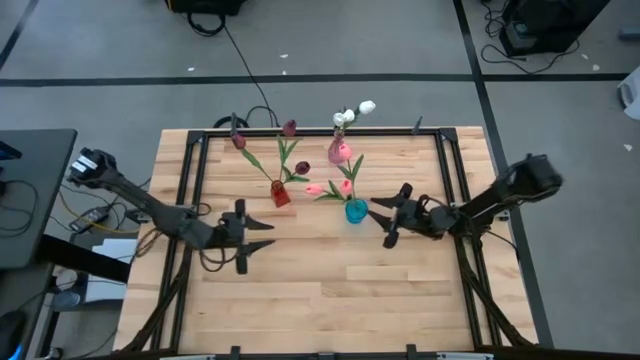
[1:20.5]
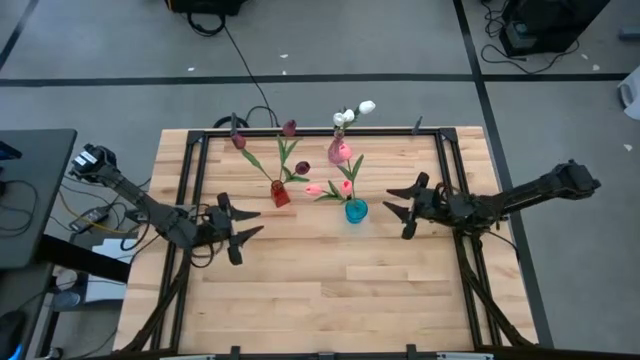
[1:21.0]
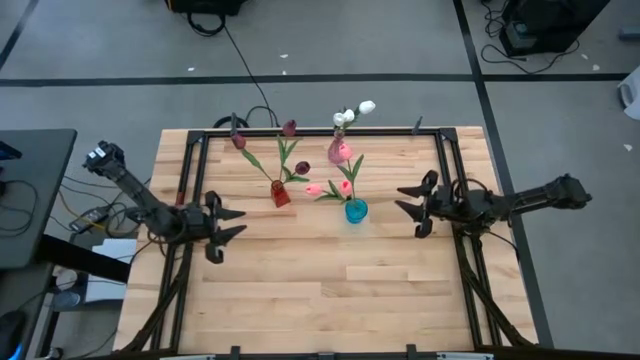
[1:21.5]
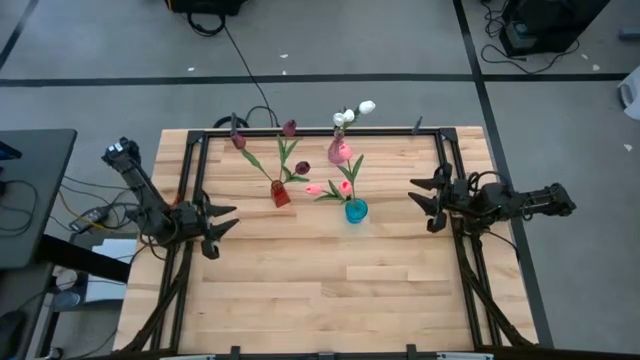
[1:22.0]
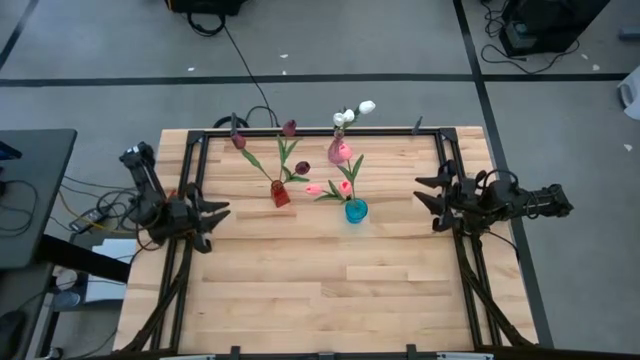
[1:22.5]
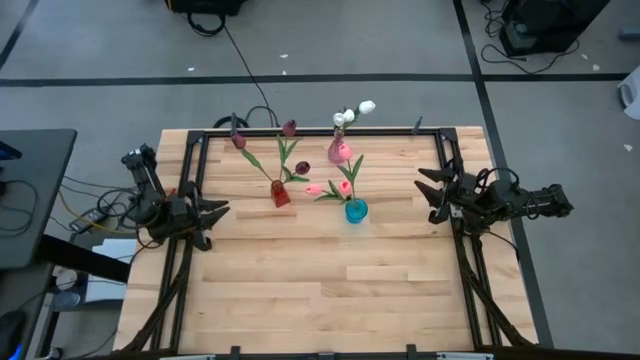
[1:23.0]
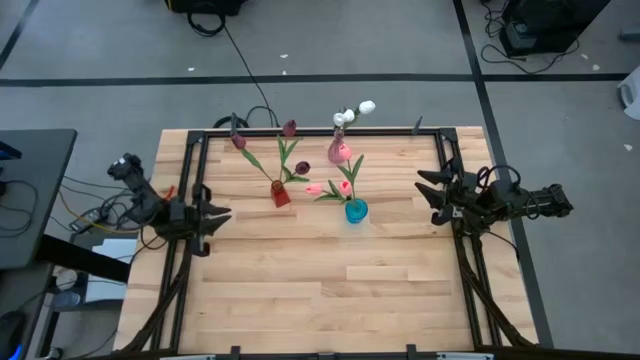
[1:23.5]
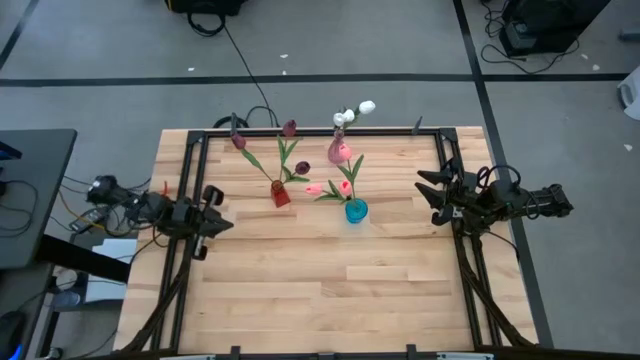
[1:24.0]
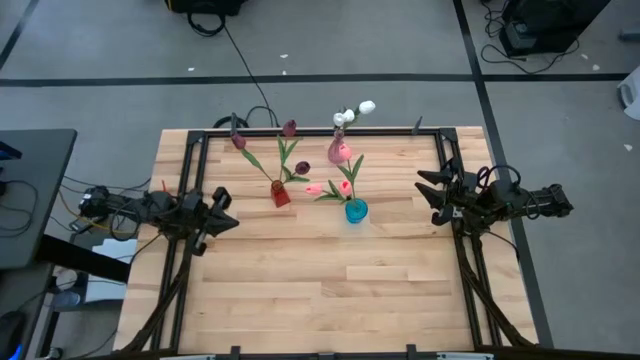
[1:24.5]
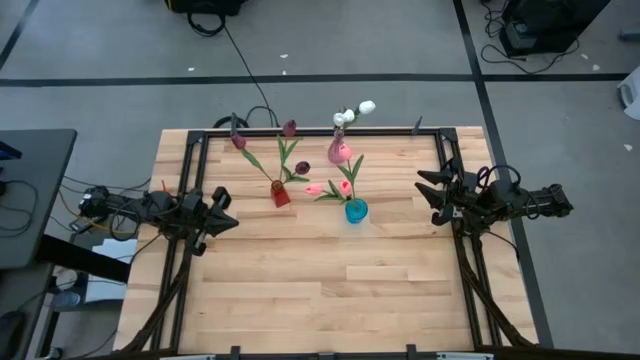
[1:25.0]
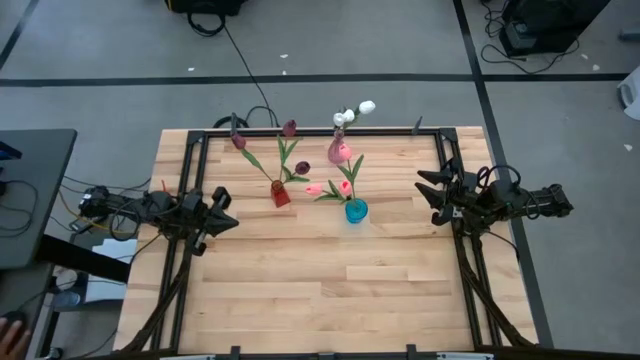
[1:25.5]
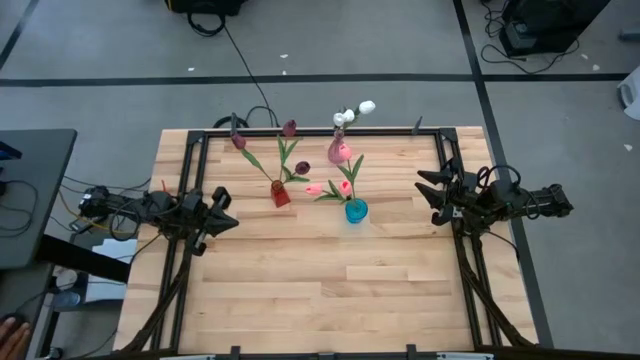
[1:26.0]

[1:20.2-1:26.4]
Task: Sort flowers into vase by color
Return to Home Position

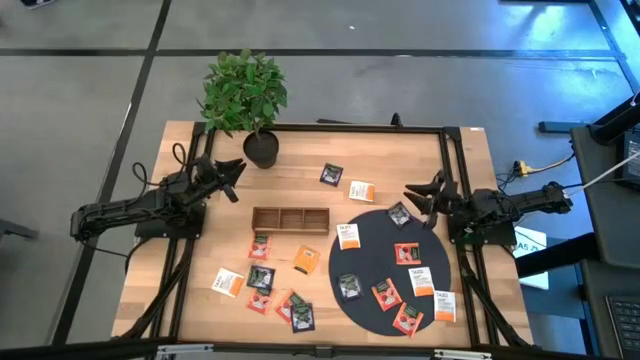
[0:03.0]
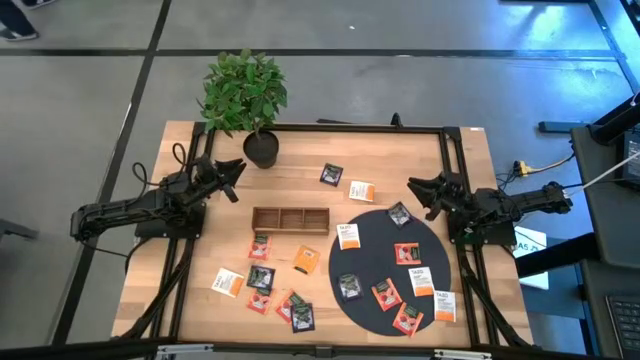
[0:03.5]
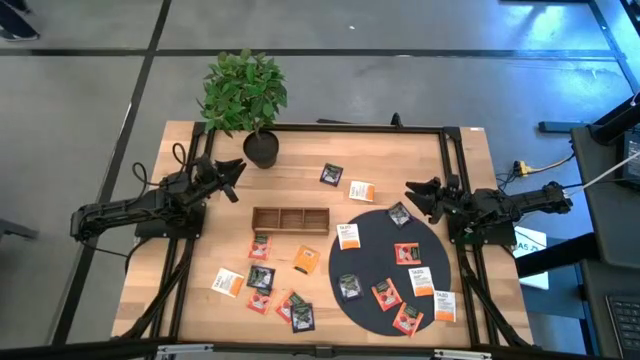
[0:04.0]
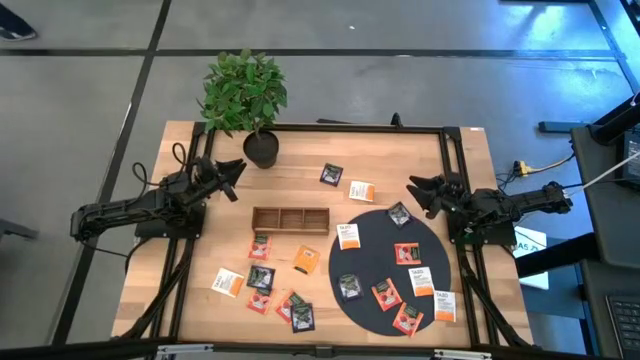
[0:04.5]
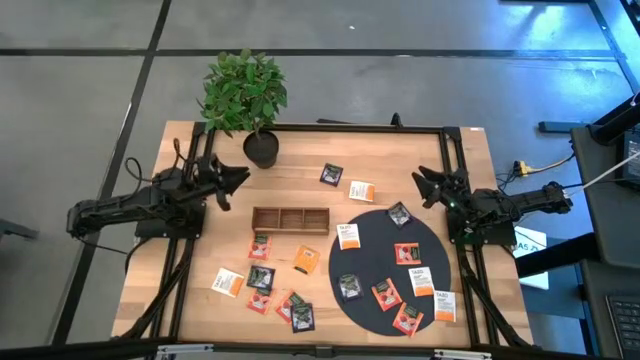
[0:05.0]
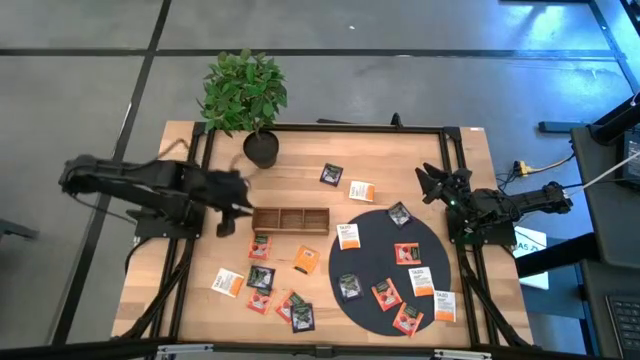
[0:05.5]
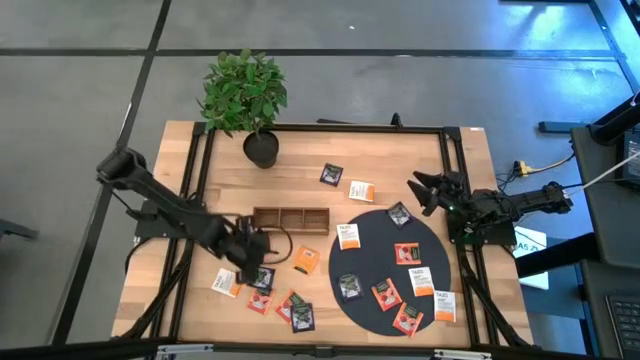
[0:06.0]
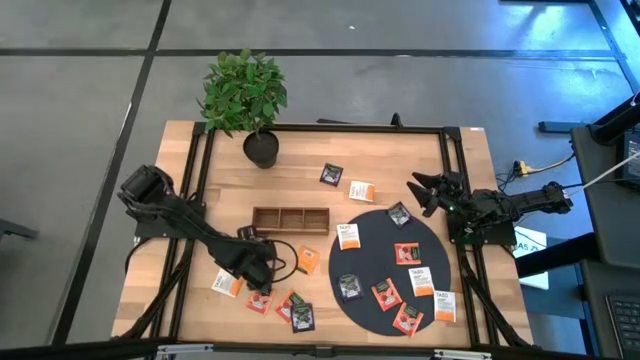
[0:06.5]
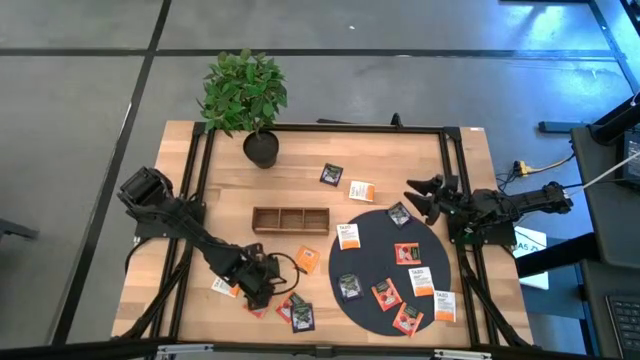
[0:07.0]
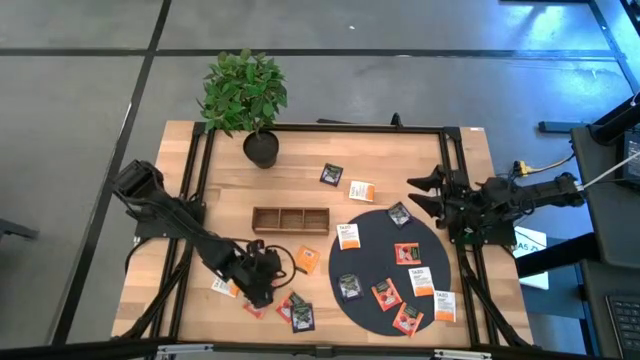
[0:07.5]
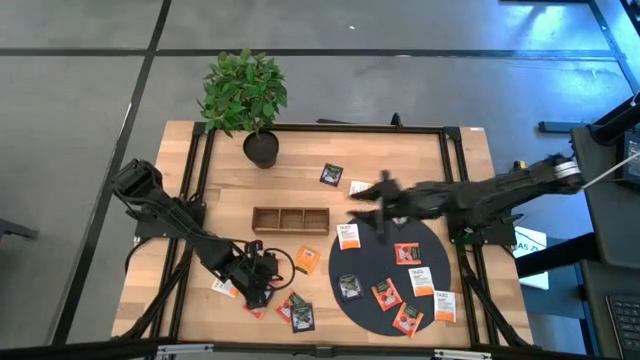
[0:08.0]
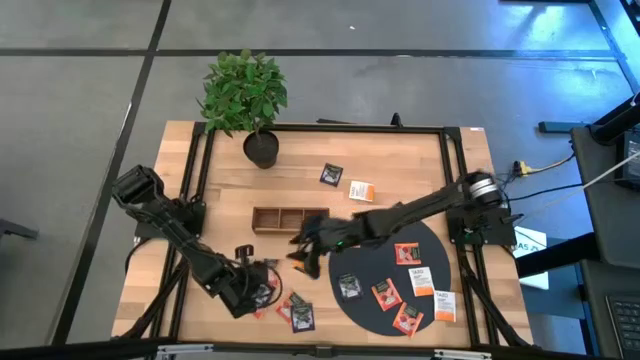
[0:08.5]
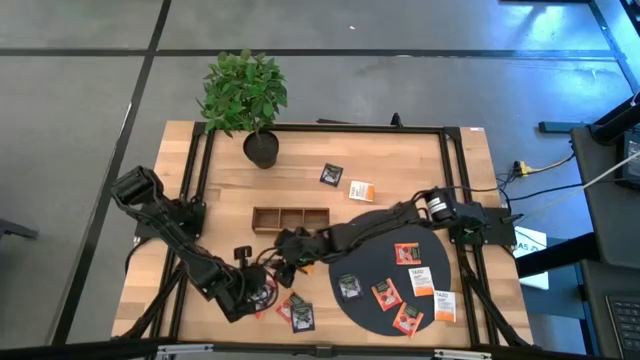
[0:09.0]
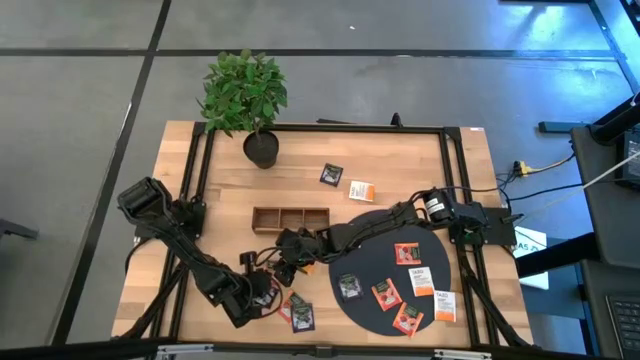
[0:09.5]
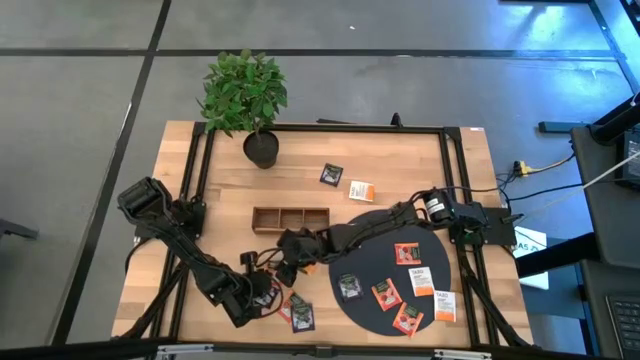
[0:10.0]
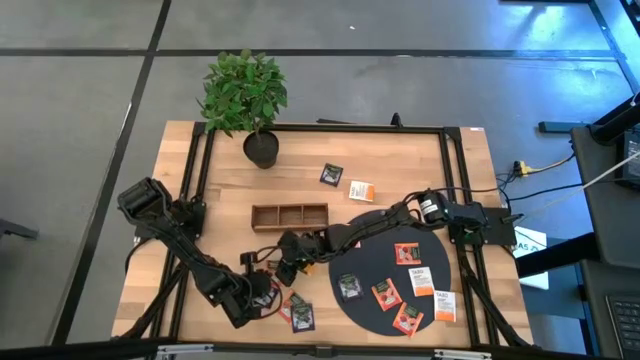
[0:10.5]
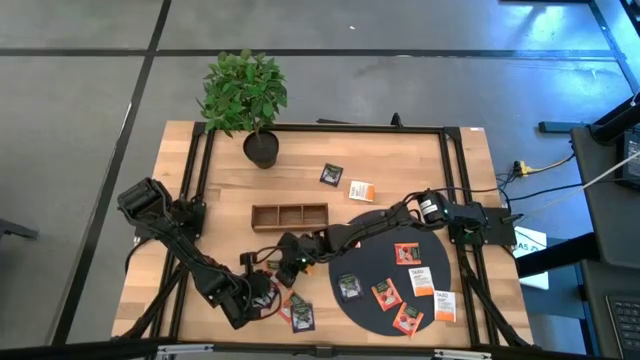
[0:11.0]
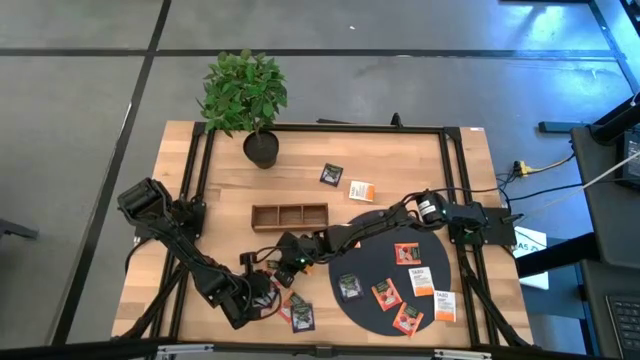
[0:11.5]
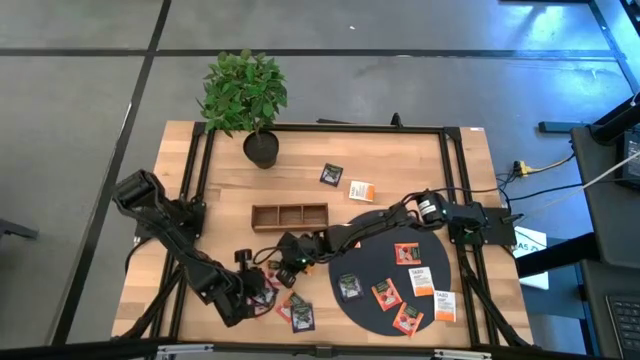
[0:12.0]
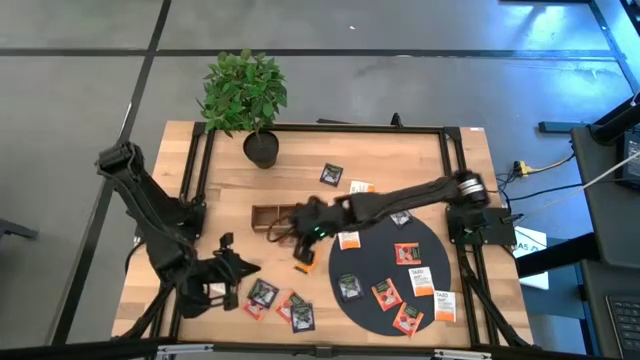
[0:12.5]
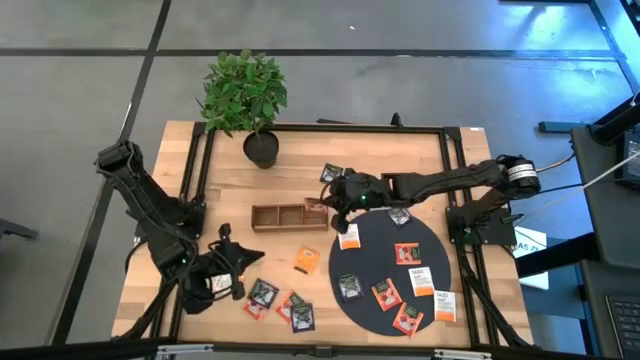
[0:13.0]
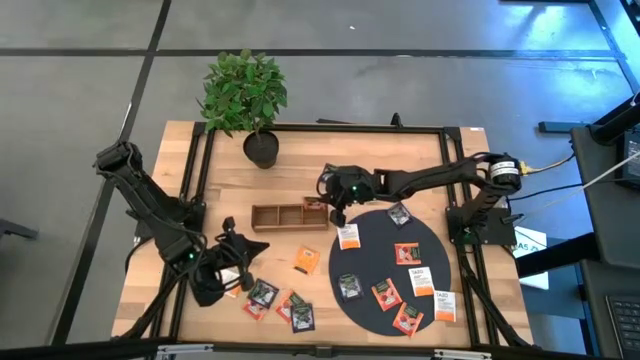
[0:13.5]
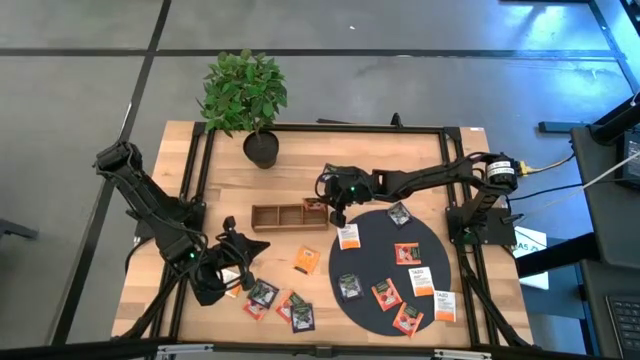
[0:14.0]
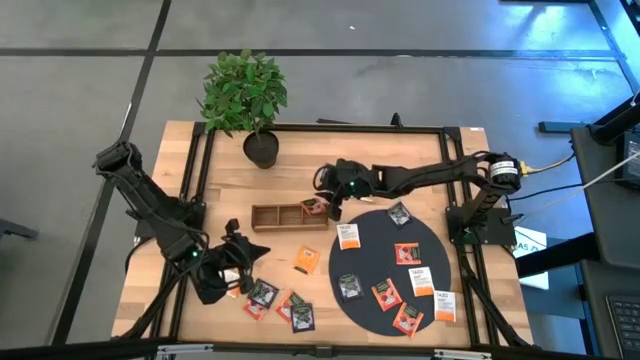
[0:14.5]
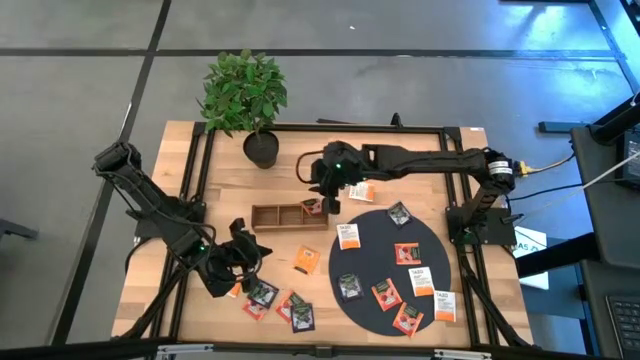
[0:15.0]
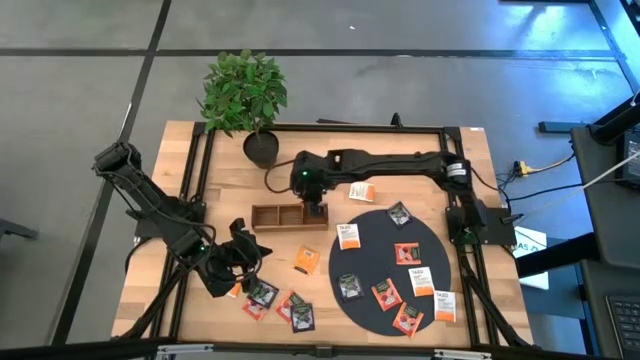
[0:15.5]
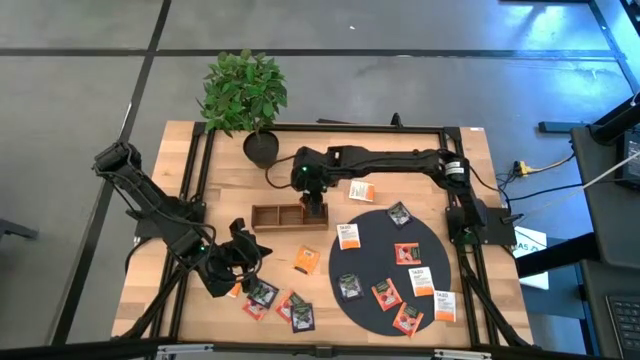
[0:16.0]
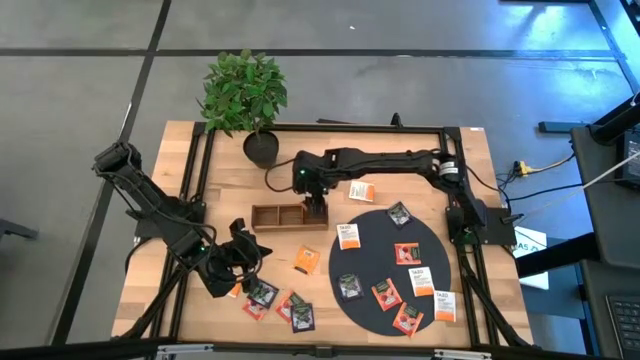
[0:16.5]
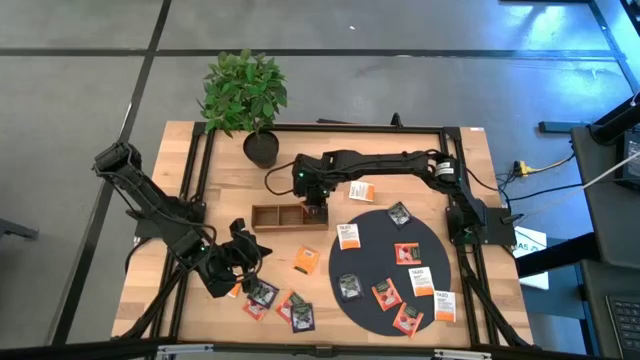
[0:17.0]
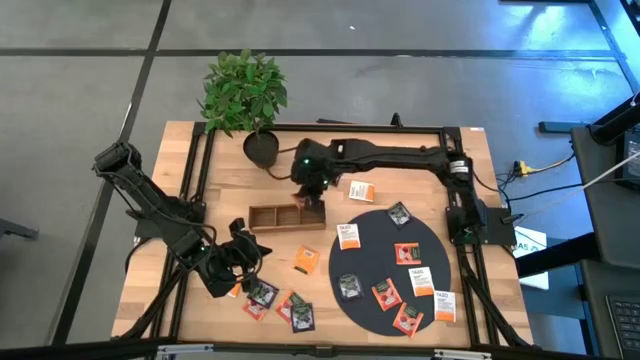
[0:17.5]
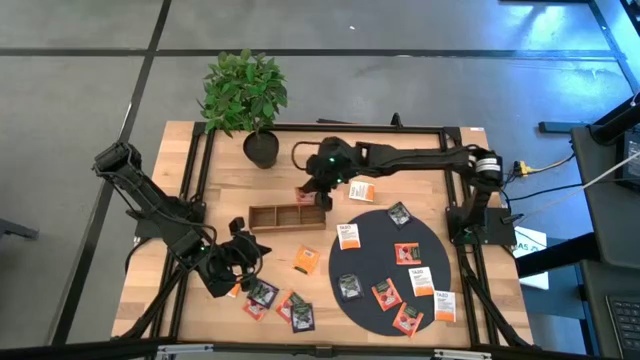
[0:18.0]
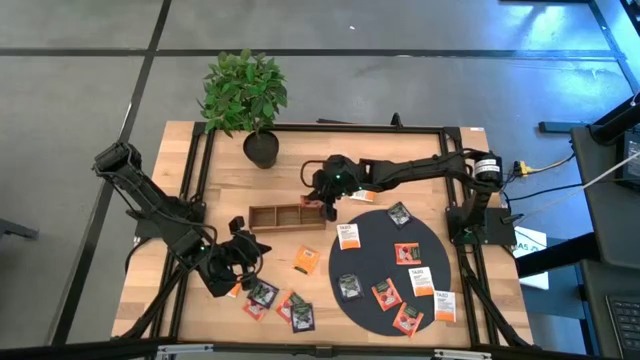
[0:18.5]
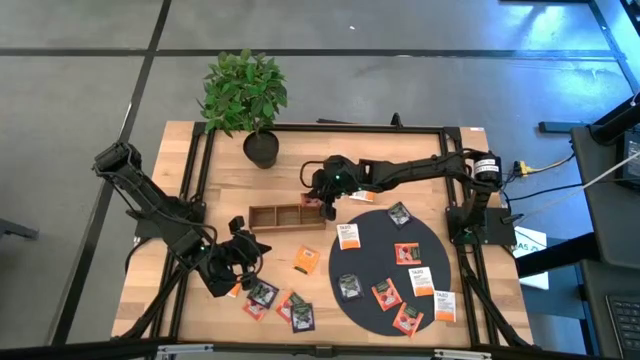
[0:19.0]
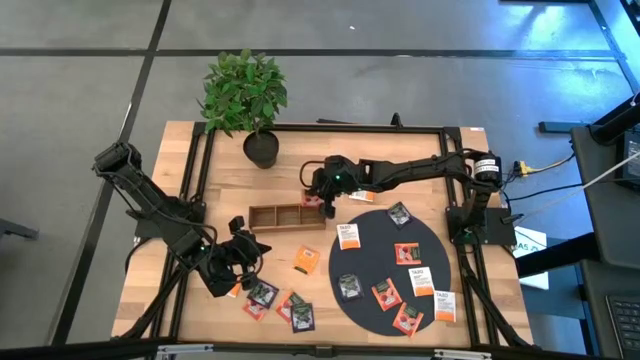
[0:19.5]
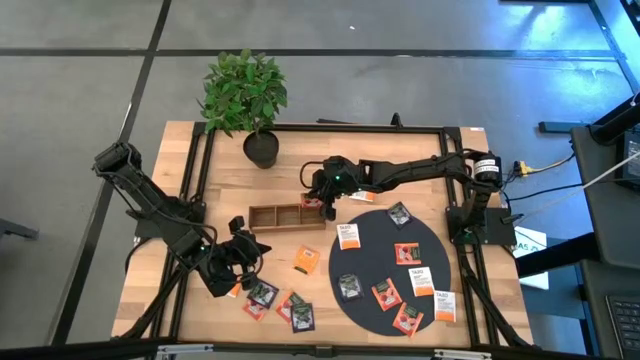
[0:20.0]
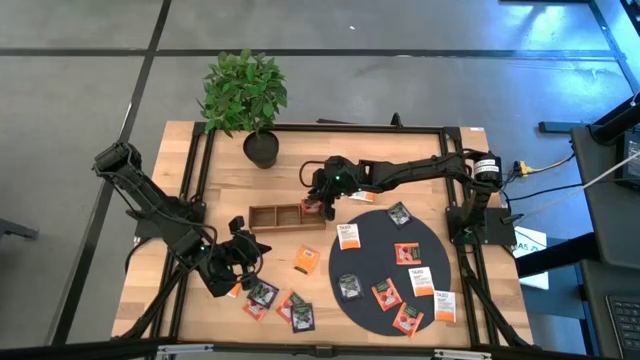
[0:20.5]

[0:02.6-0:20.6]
Task: Pick & Place Tea
Put the orange tea bag into the right section of the wooden organizer
